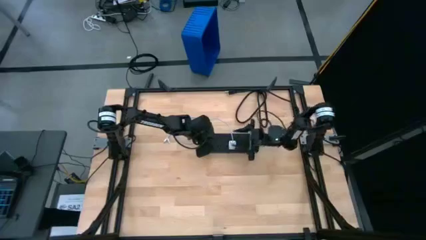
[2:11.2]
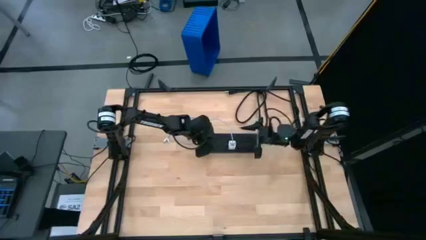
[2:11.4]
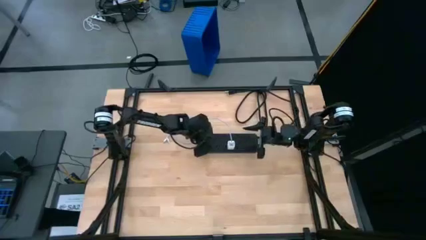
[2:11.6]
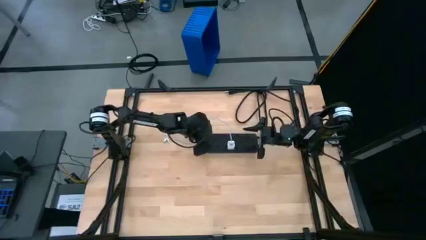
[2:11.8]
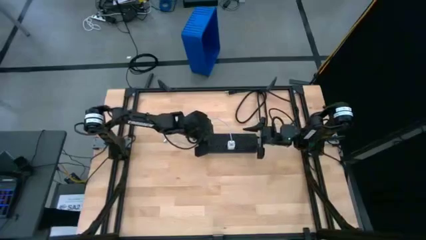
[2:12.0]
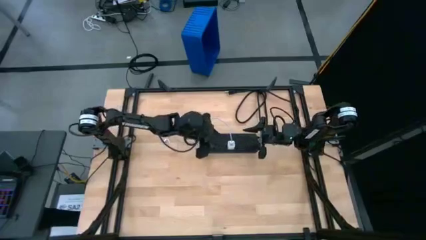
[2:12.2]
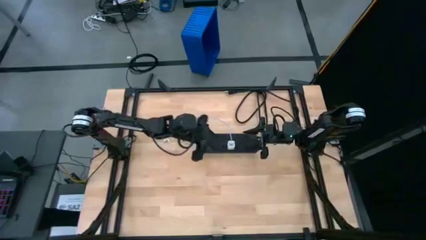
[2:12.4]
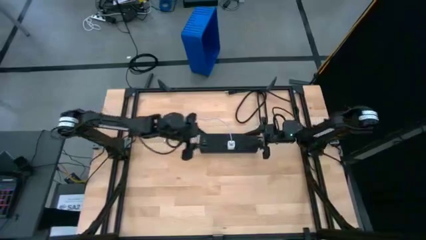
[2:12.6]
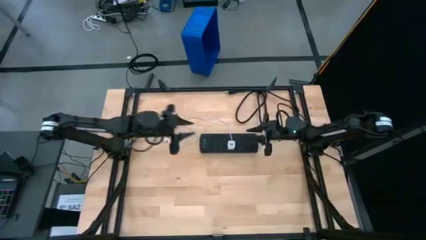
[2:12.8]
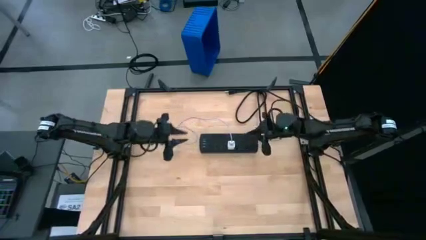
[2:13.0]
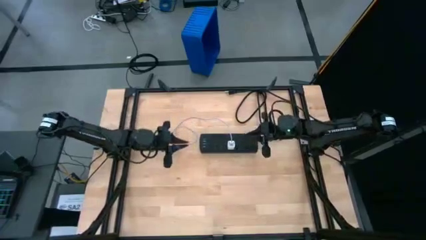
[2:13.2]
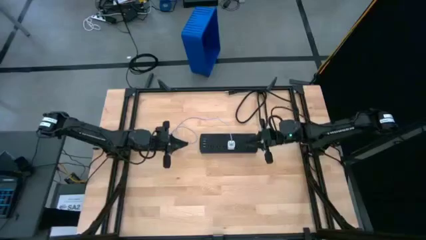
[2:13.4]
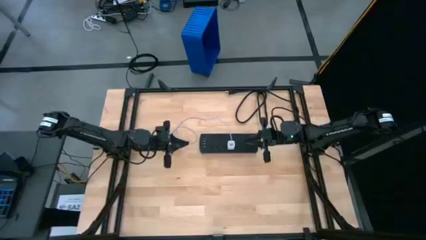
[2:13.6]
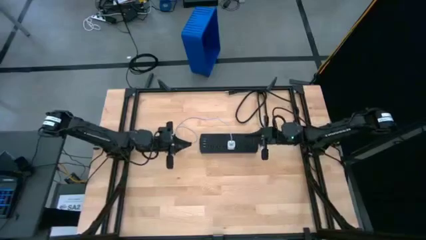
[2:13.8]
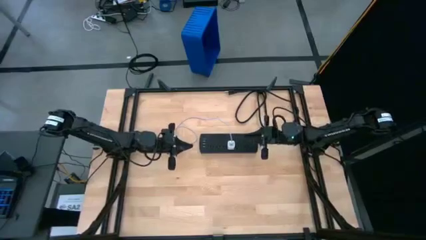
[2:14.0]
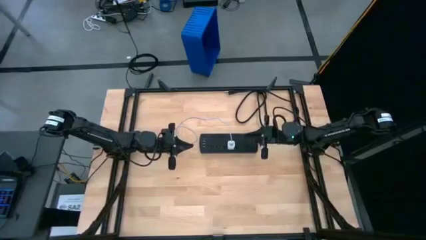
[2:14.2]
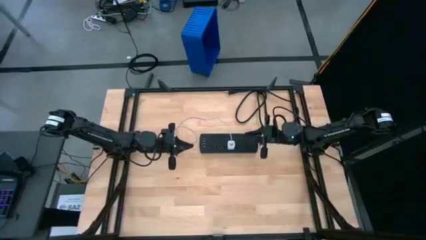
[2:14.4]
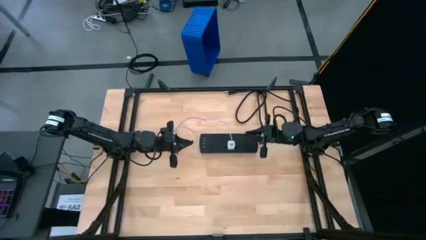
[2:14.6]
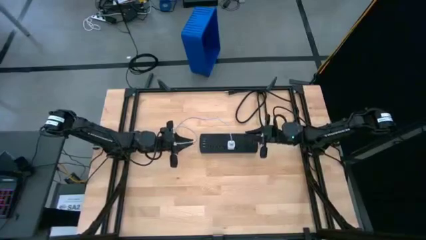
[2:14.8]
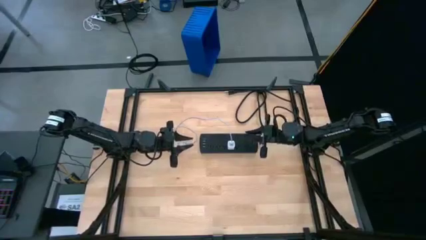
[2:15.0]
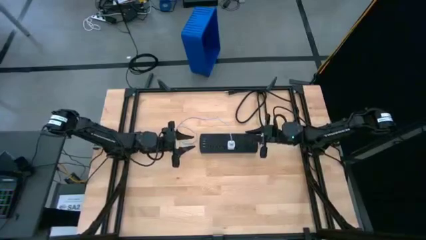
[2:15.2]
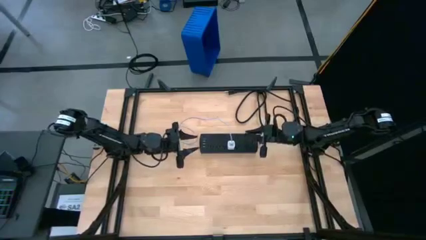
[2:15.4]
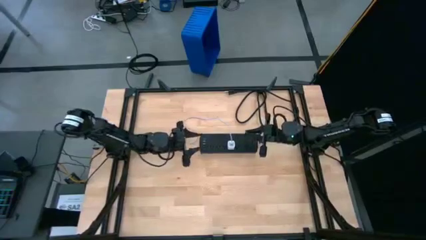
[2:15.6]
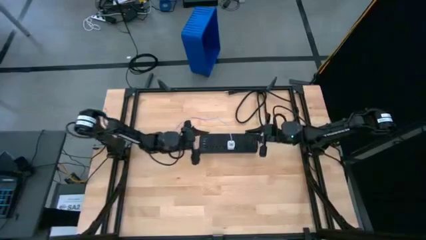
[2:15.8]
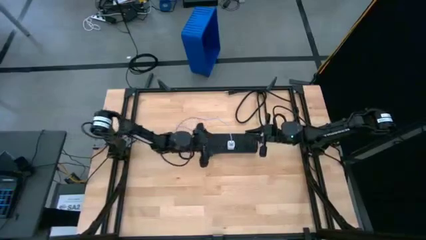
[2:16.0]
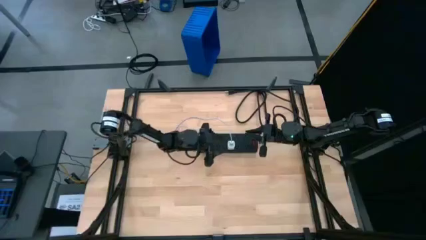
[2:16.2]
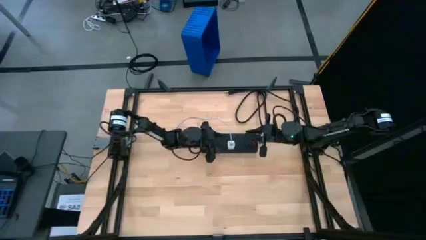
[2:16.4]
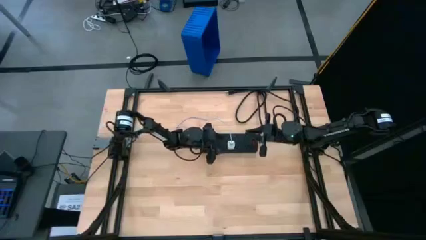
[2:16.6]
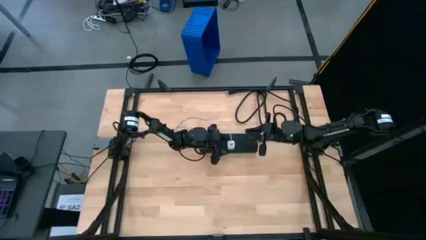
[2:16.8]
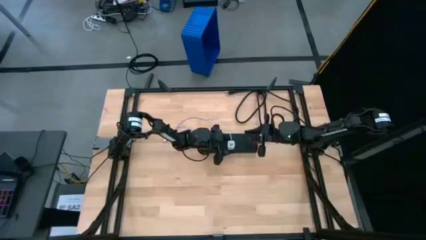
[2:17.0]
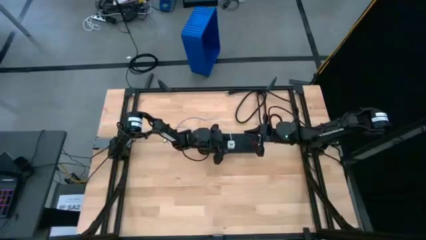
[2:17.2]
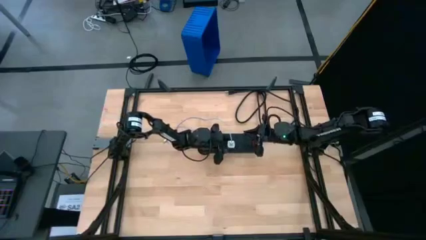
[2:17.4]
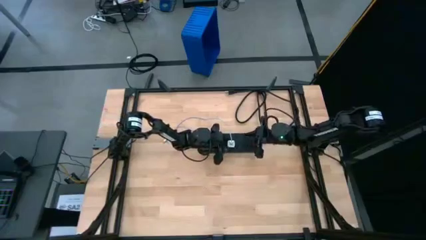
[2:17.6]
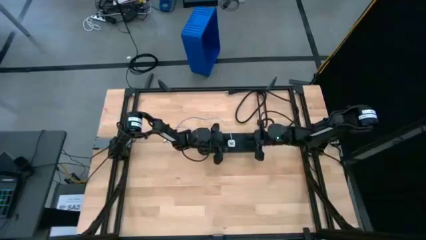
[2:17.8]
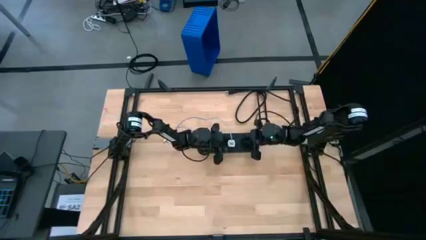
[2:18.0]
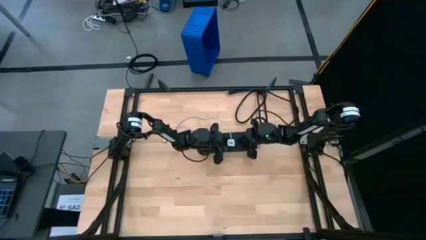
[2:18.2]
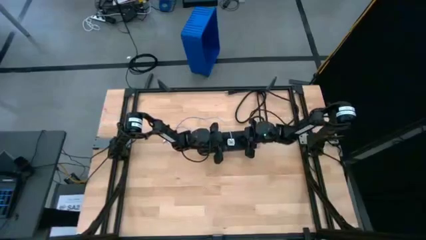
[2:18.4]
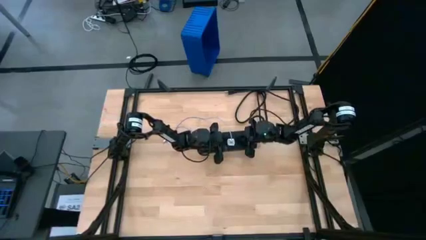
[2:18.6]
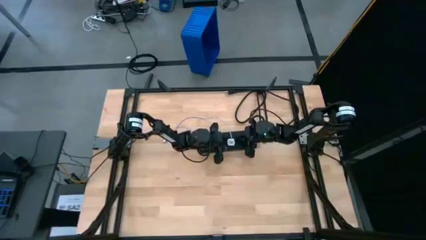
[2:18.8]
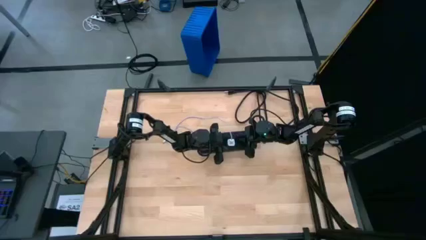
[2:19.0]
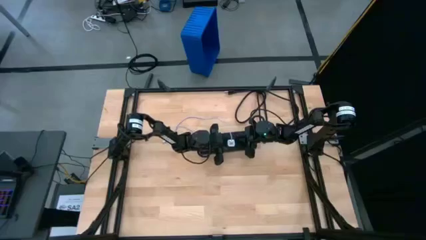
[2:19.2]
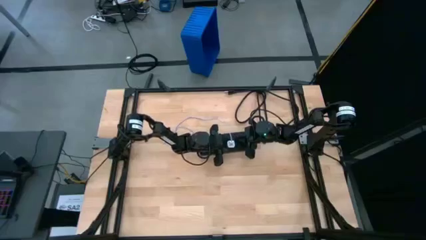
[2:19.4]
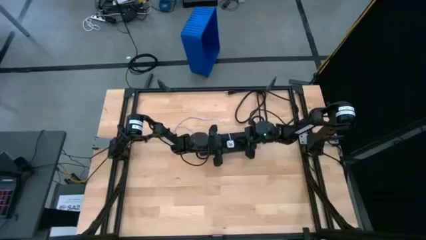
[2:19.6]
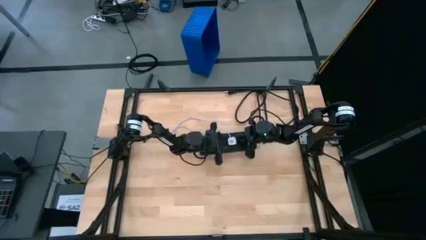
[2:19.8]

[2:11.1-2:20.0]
Task: Insert USB
Remove the white charger adapter from the black outlet extension

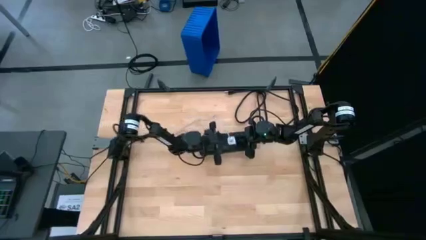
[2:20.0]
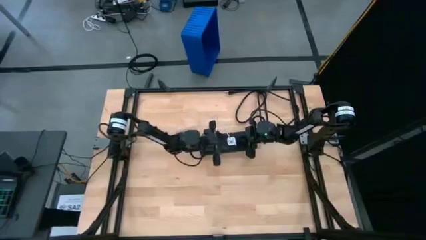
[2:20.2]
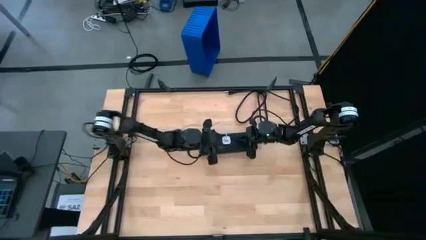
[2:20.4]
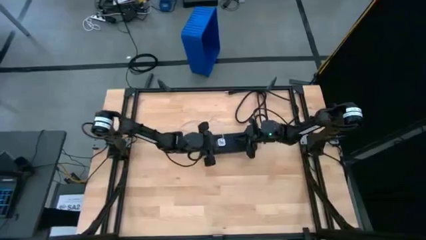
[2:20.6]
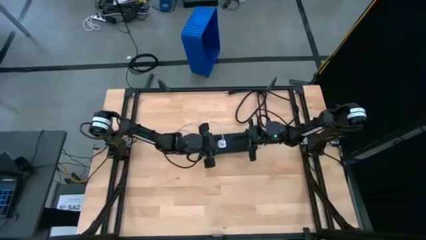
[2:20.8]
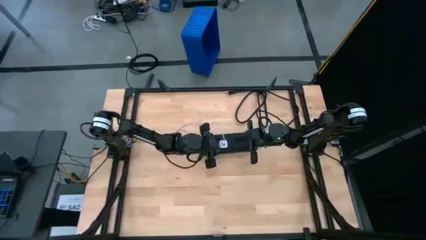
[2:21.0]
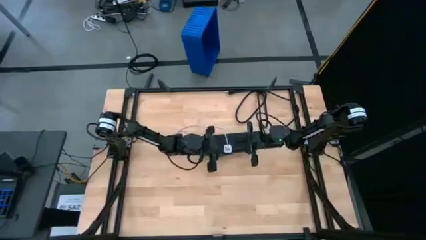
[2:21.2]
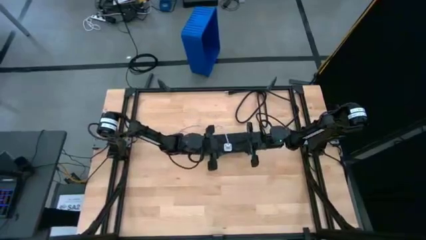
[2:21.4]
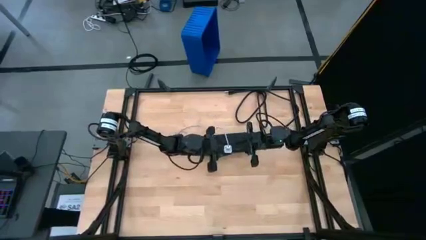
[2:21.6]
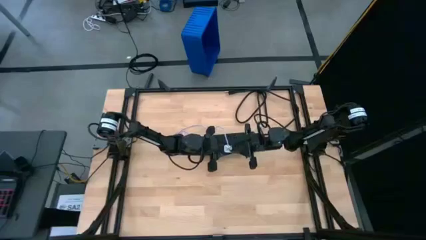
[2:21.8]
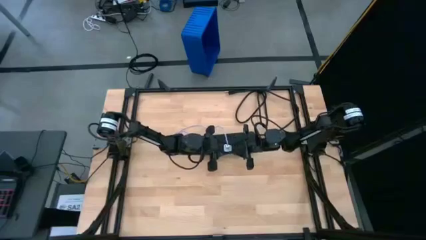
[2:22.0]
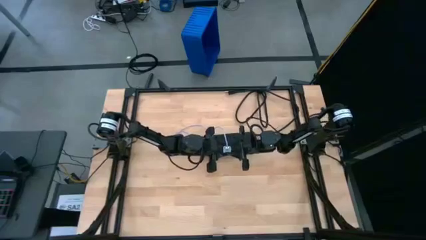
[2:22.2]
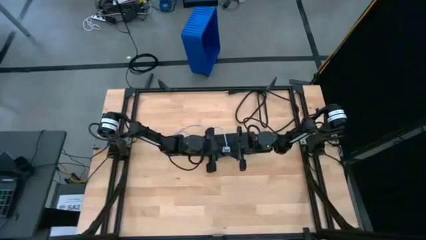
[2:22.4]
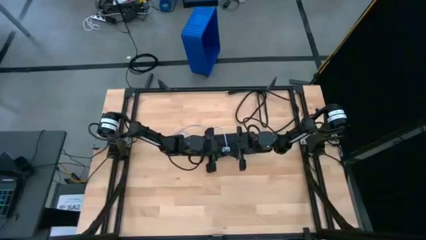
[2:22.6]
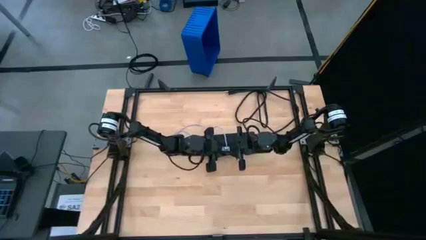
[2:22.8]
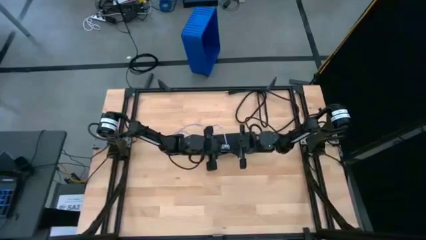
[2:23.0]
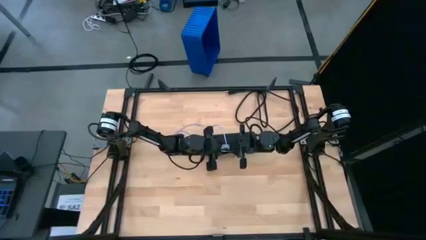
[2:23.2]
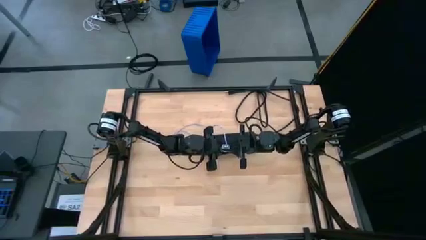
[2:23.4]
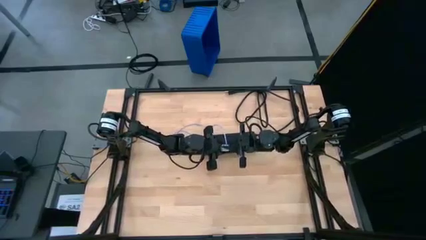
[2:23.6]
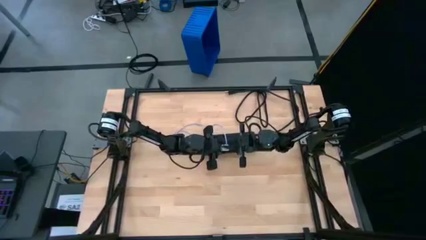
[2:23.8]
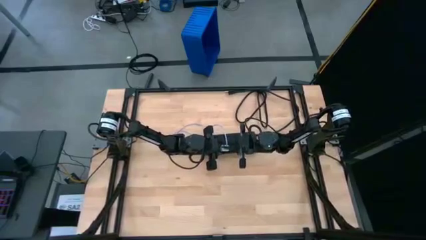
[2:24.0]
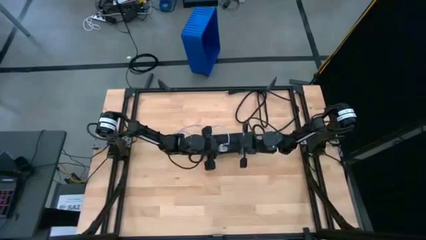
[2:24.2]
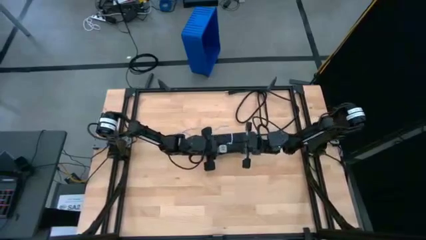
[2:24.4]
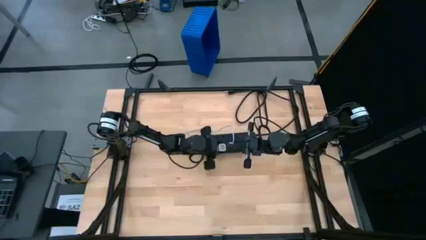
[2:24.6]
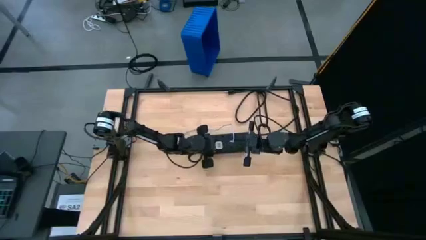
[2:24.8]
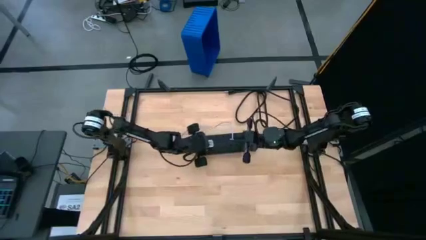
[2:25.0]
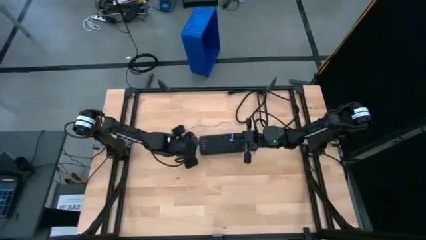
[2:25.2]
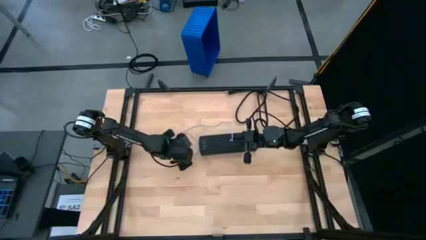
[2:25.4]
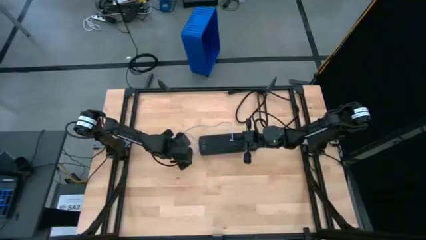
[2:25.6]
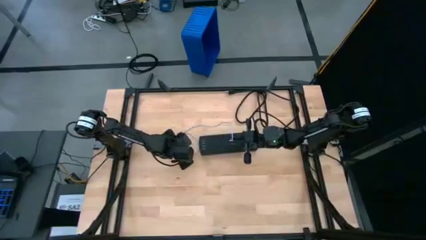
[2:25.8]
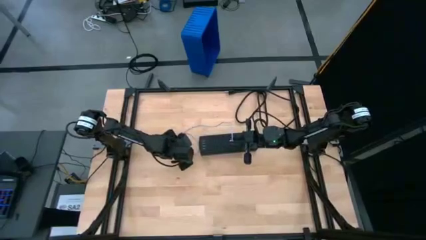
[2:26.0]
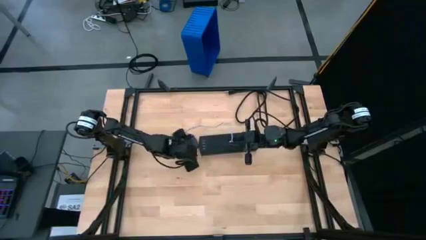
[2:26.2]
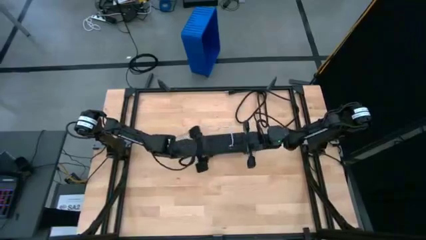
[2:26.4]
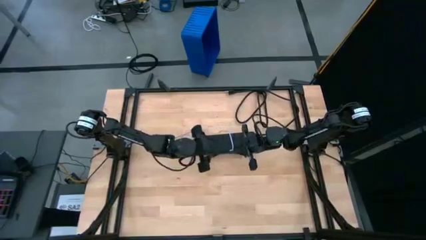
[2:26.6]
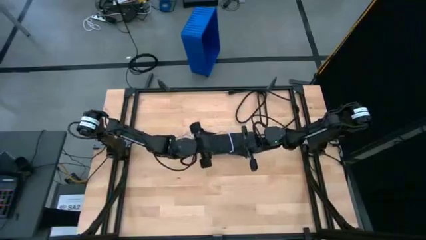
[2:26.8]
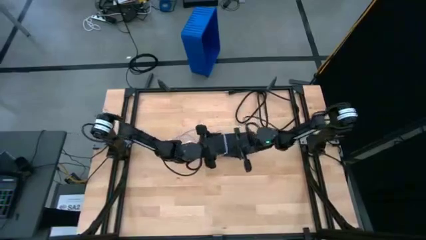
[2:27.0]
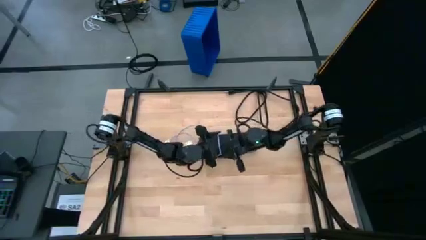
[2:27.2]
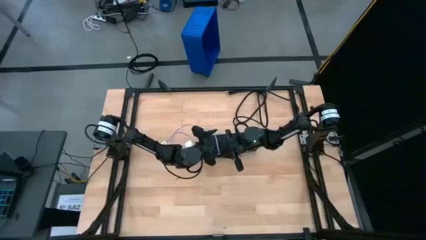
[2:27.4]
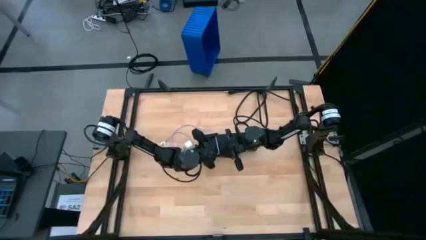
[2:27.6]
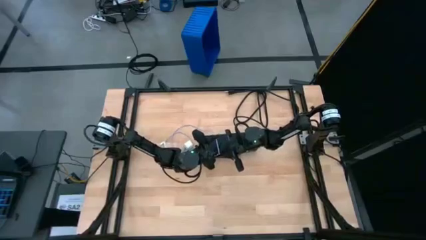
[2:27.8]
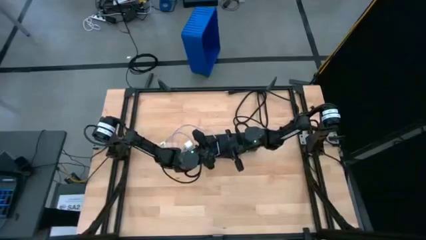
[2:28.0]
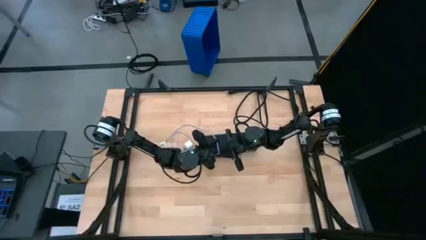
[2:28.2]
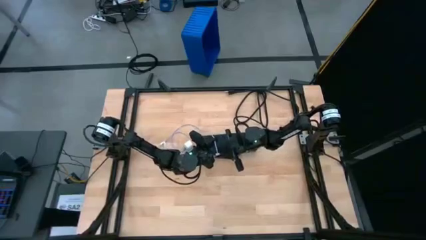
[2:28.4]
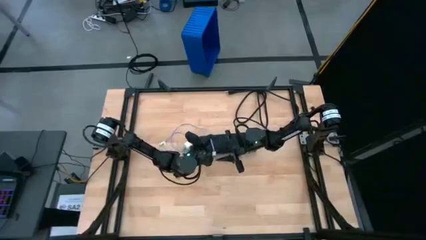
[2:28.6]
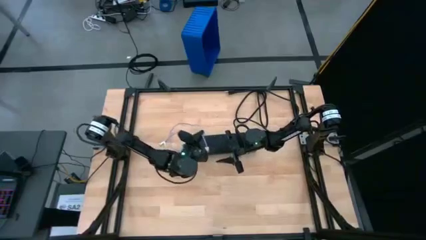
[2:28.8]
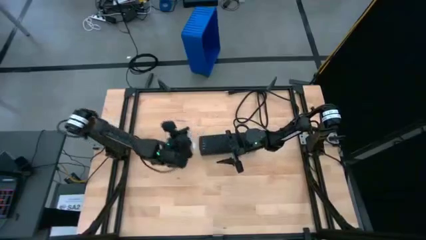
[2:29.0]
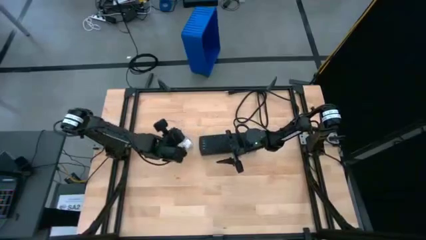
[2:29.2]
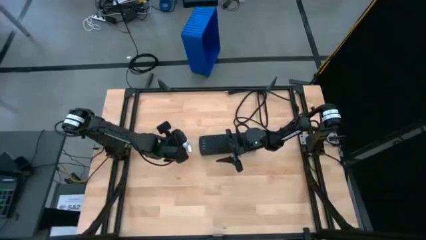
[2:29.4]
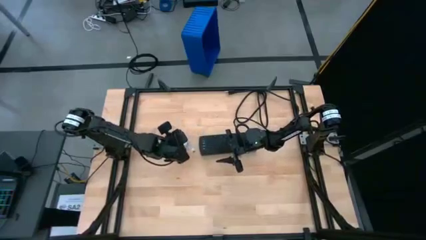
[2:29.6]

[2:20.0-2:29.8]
Remove the white charger cable from the white charger adapter
